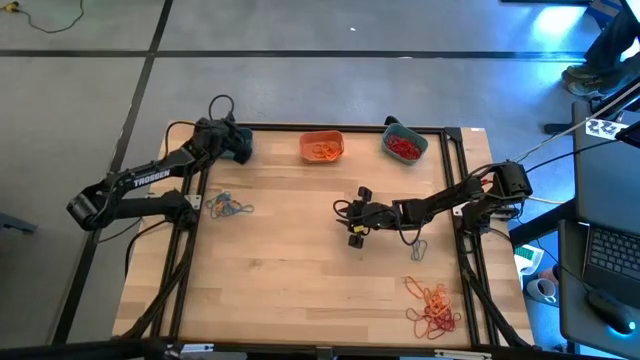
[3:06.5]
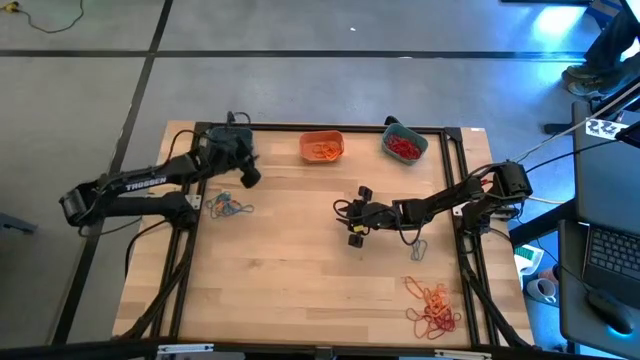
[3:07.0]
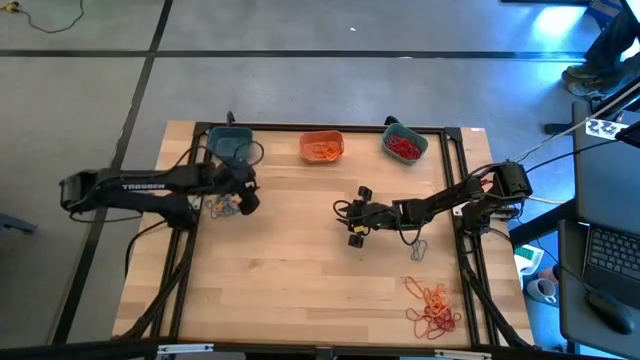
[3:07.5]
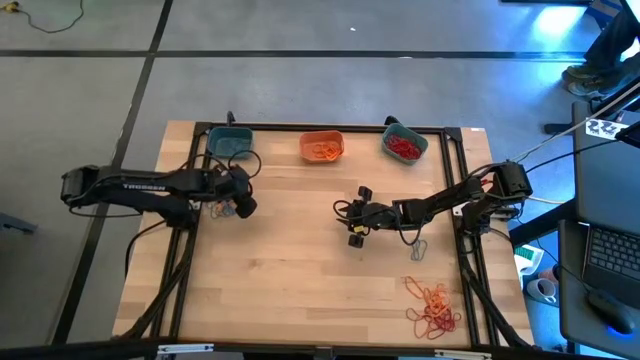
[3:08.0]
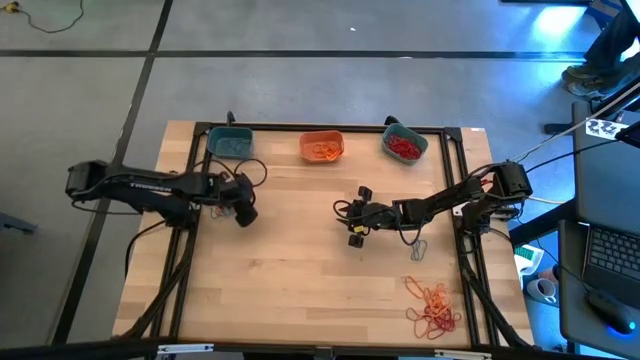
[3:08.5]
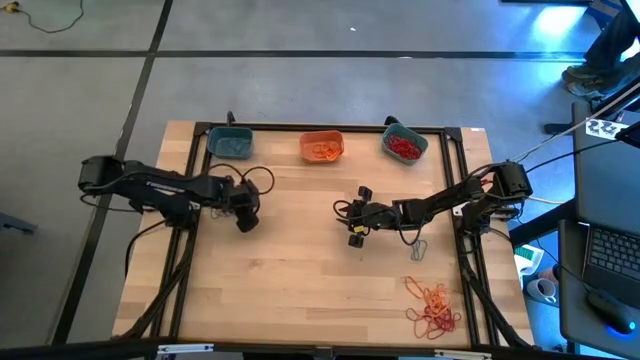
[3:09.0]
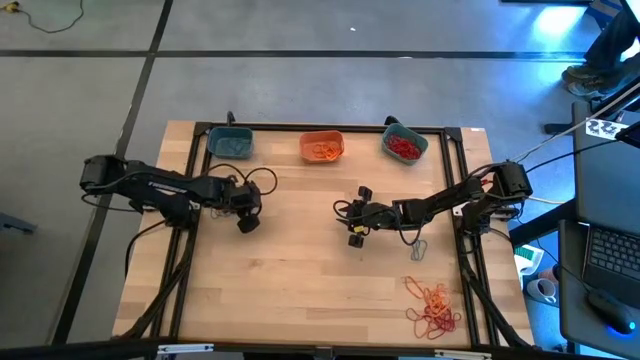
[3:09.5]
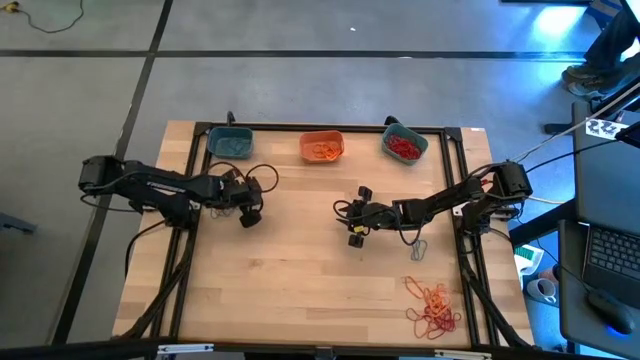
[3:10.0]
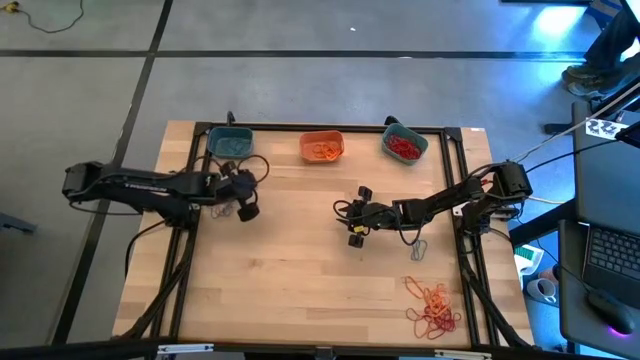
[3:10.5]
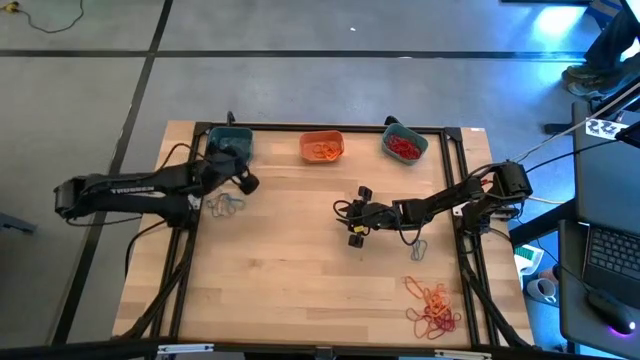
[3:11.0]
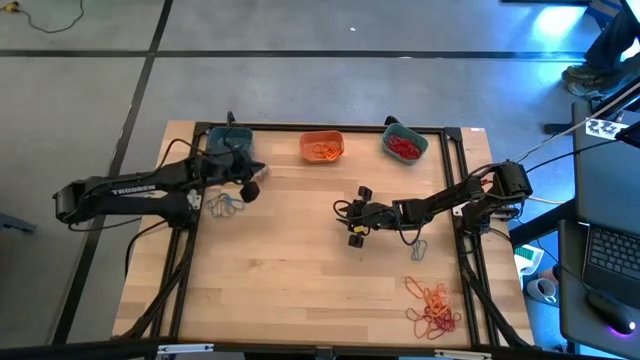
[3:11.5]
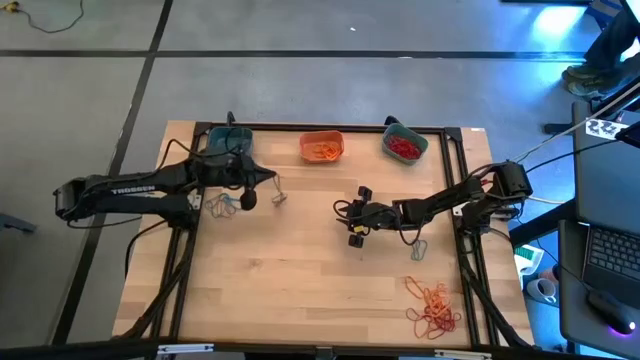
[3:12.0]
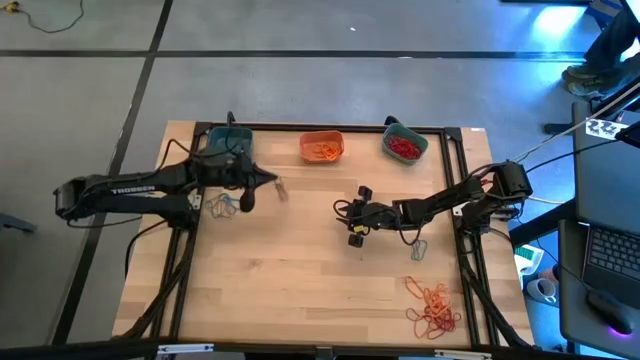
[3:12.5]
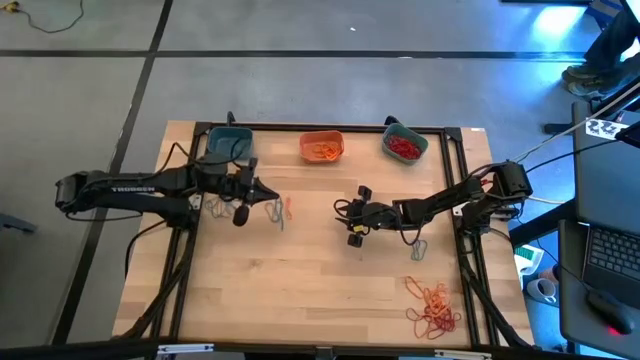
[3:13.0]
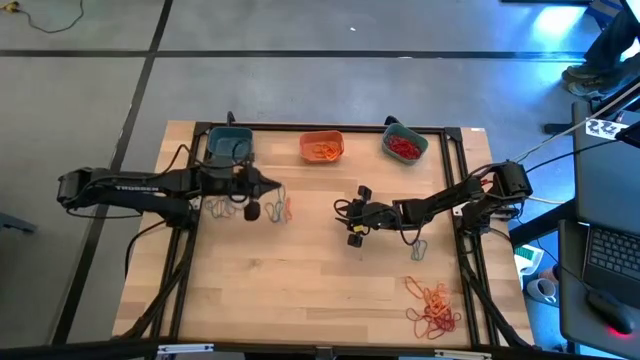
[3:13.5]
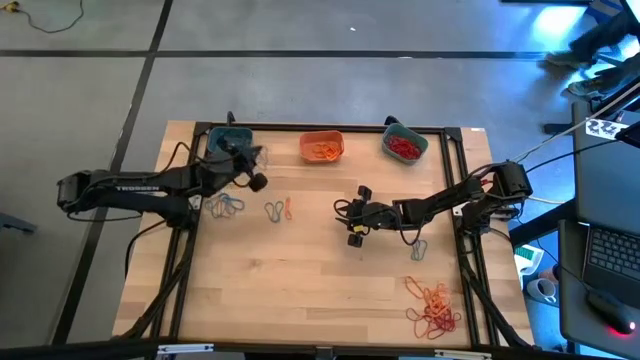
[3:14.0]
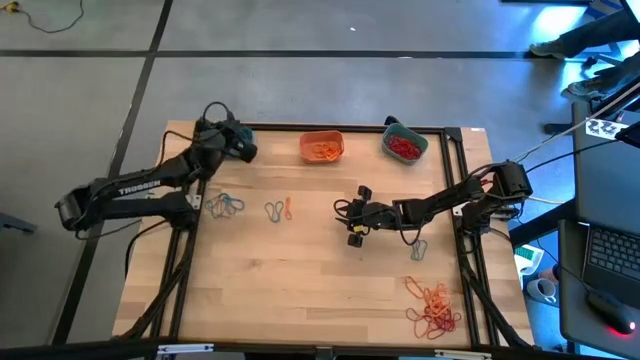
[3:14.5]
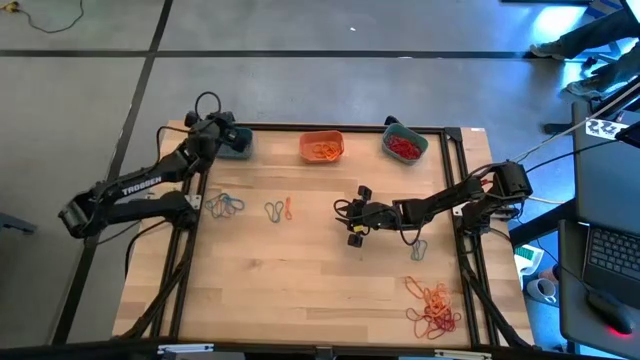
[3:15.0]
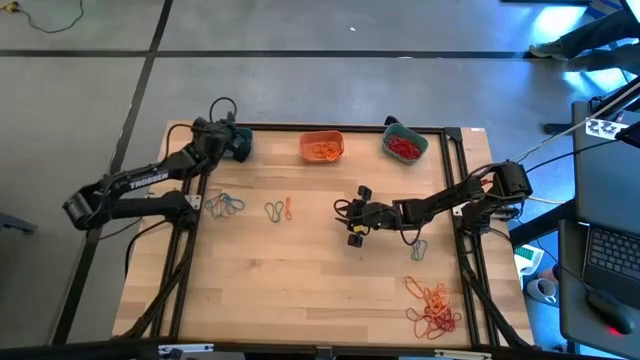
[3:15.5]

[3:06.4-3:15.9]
Task: Sort rubber bands into baskets
Put the blue rubber band into the blue bin

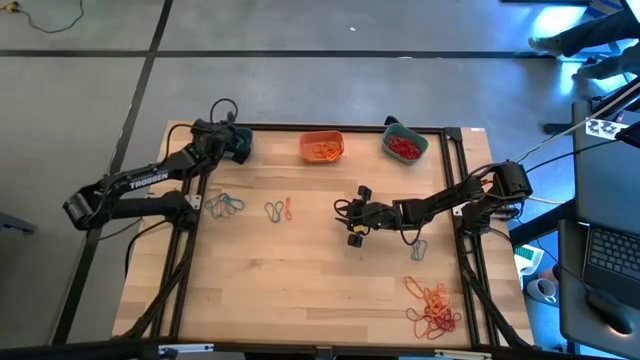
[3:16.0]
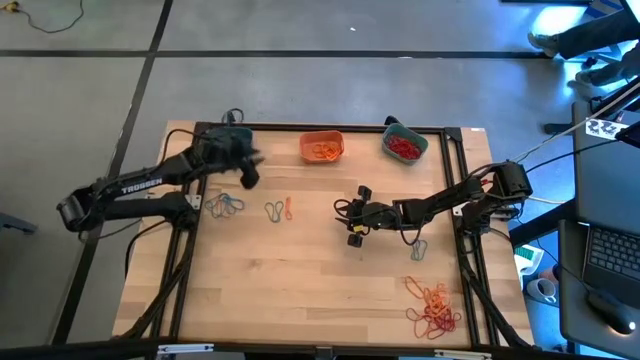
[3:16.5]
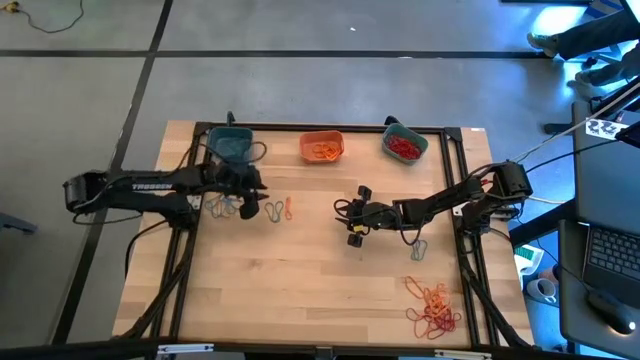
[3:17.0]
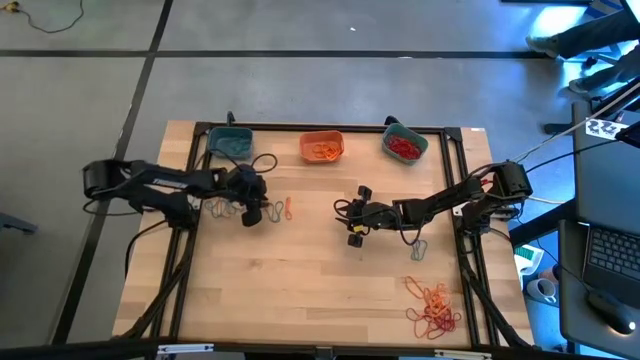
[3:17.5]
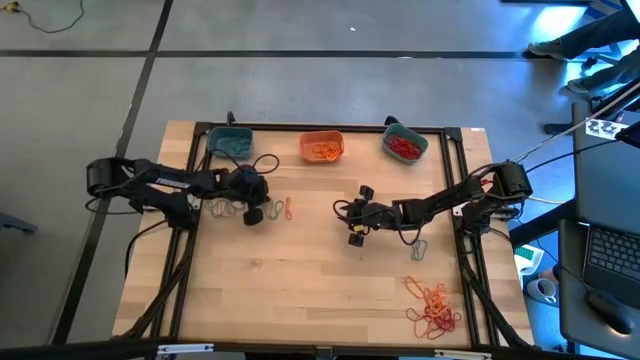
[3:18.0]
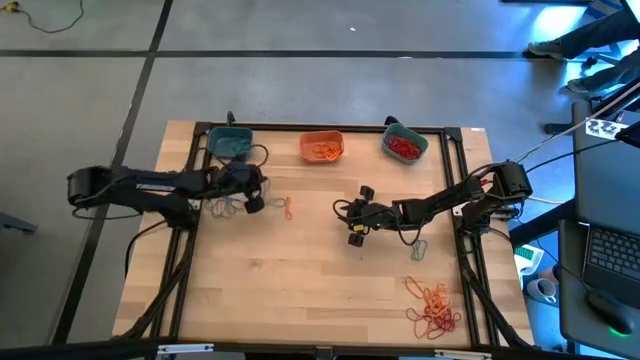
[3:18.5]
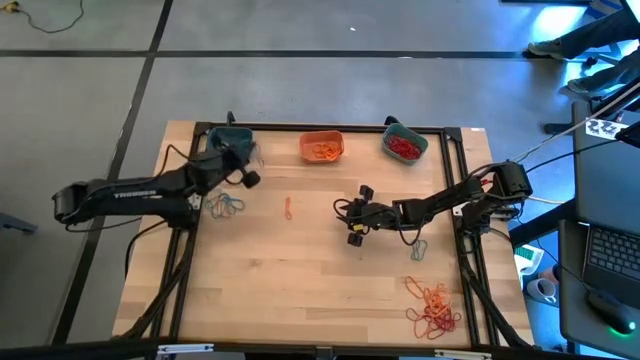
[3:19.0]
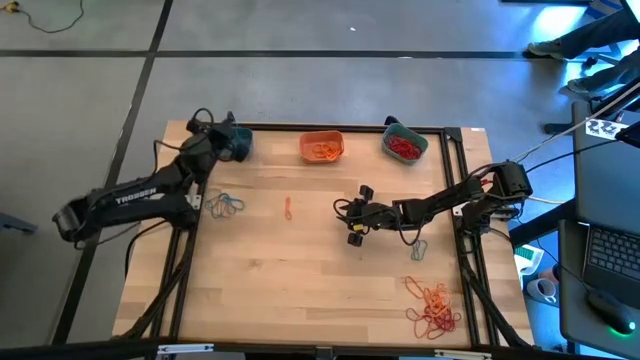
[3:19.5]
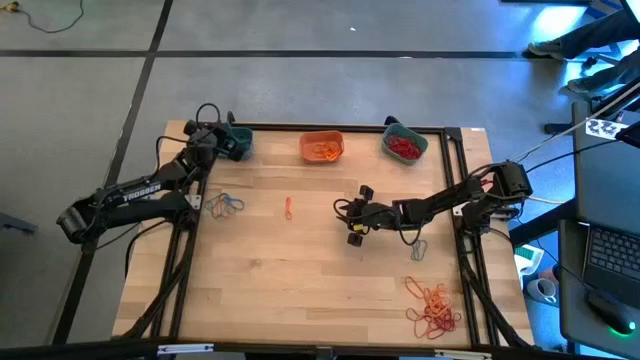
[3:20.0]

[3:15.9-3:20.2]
Put the blue rubber band into the blue bin

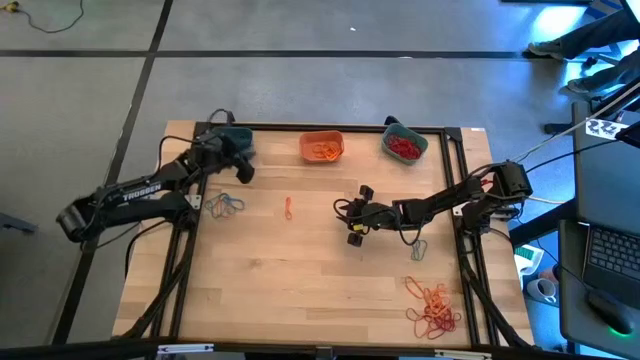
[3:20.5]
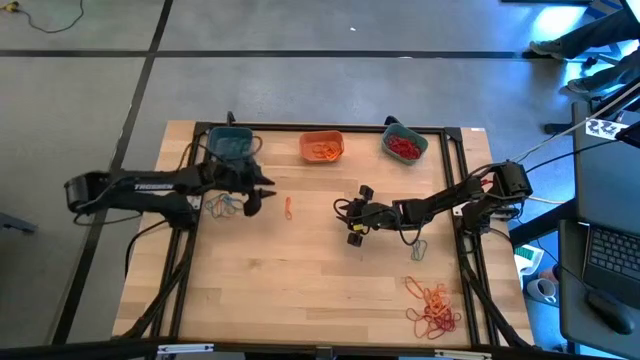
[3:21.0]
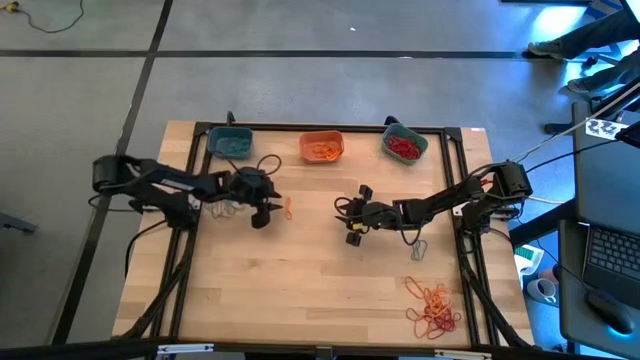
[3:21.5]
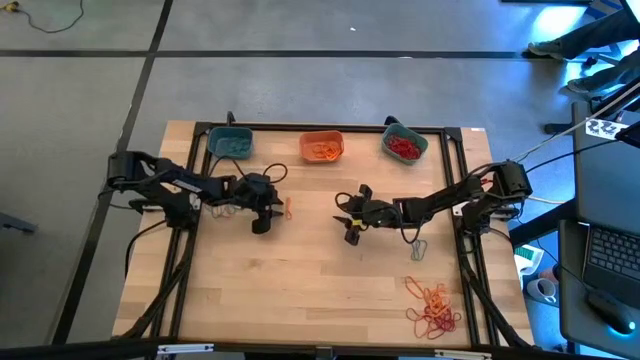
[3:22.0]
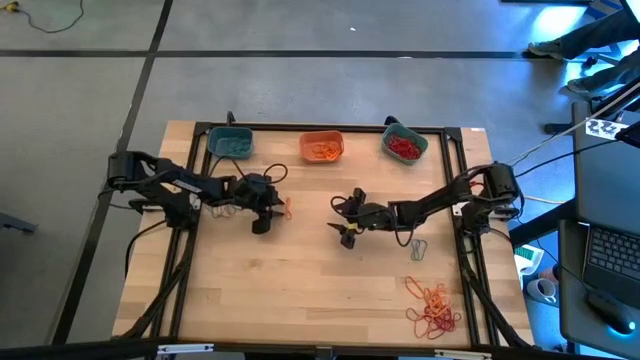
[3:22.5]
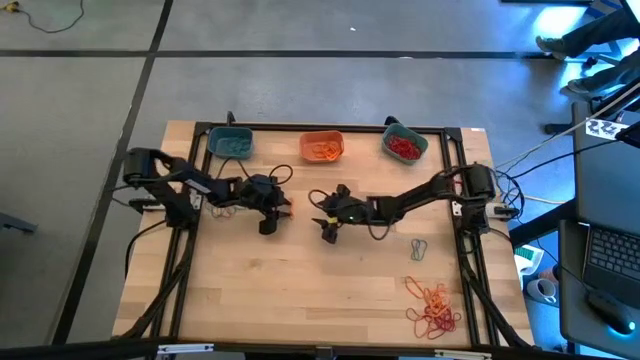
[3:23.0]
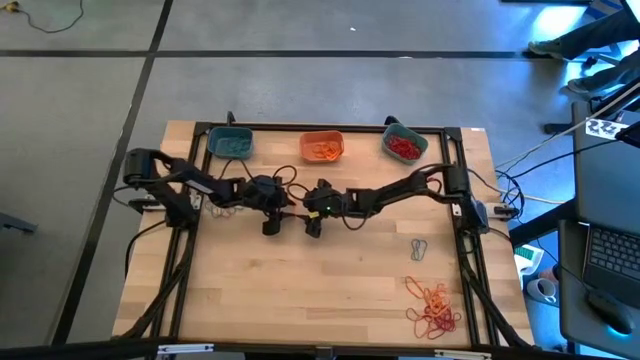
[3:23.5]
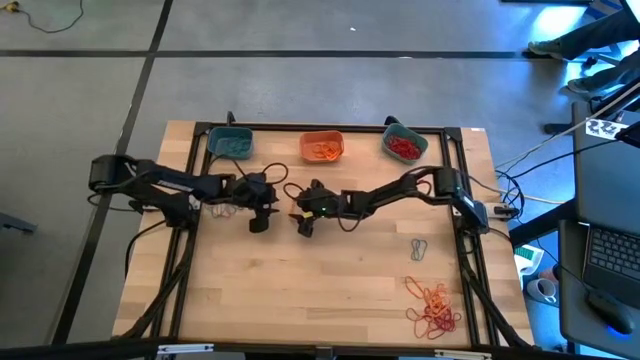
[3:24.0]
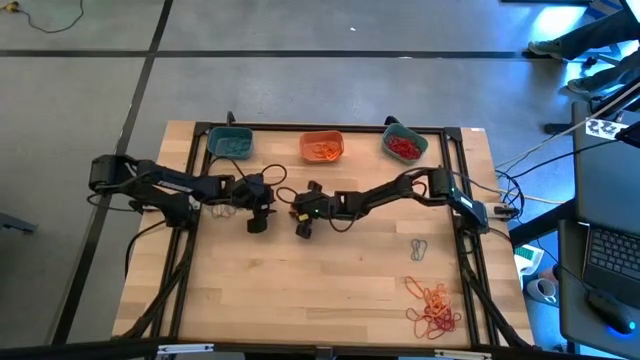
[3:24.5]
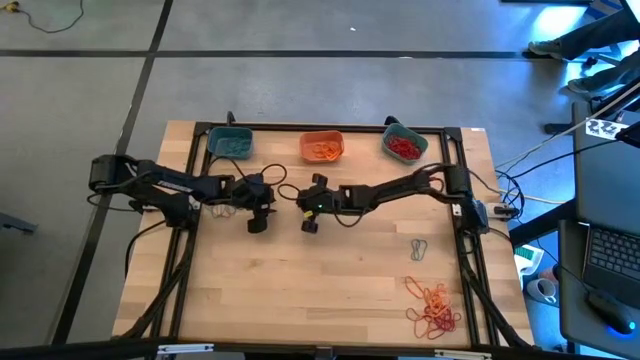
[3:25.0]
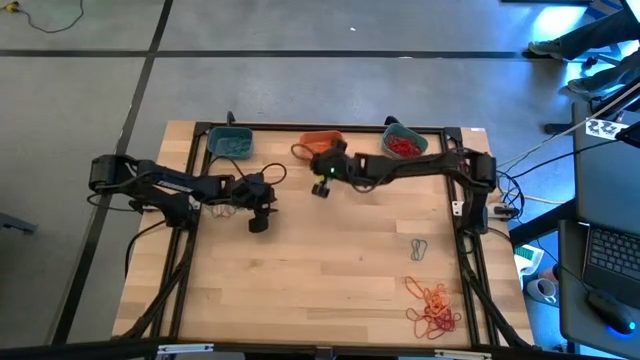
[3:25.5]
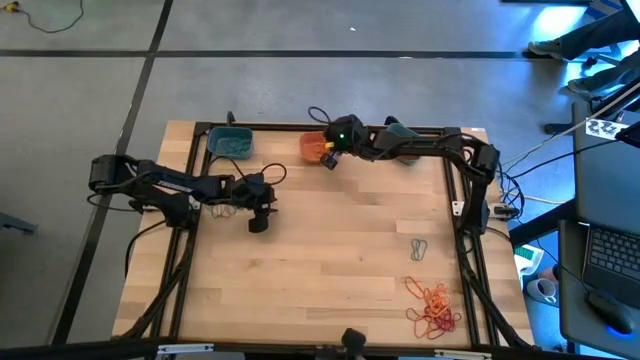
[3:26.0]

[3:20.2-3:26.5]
Put the orange rubber band into the orange bin
